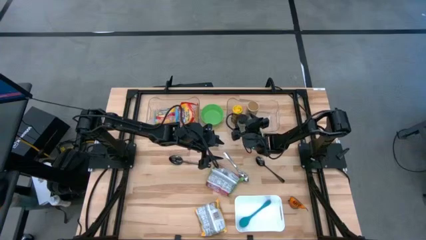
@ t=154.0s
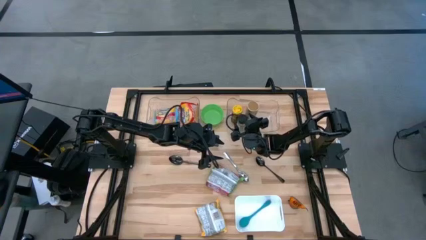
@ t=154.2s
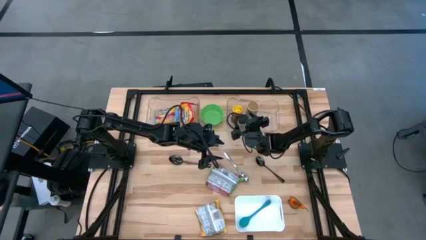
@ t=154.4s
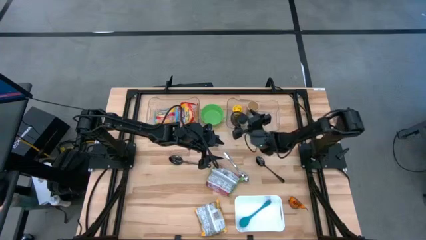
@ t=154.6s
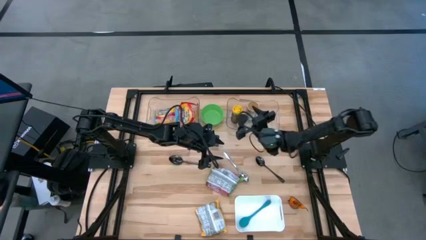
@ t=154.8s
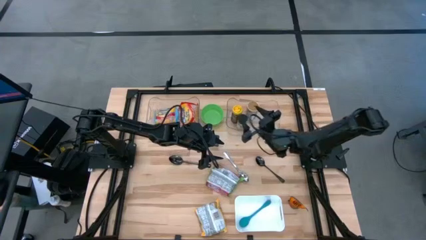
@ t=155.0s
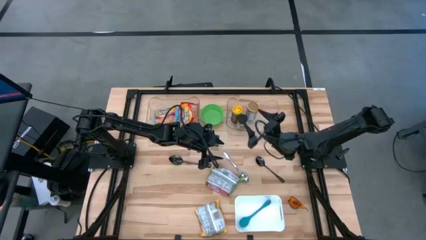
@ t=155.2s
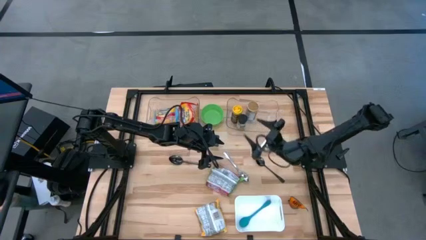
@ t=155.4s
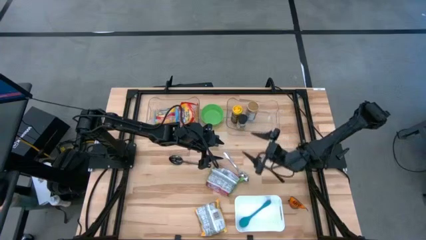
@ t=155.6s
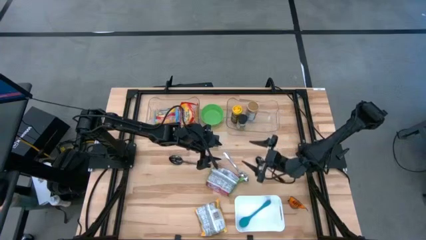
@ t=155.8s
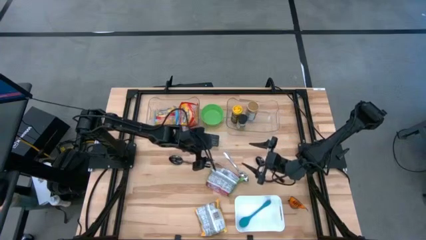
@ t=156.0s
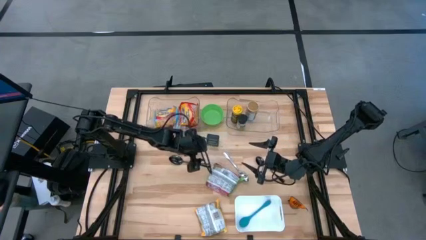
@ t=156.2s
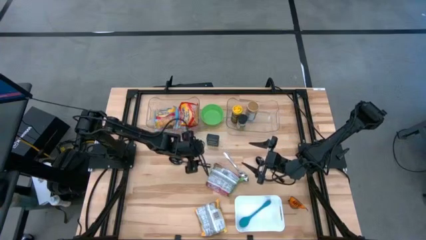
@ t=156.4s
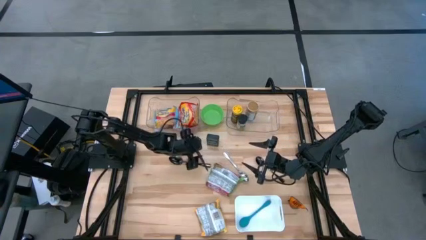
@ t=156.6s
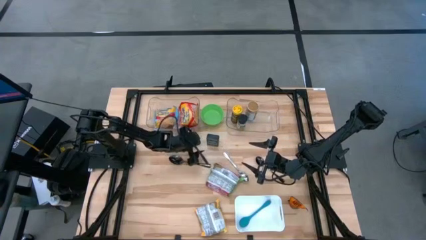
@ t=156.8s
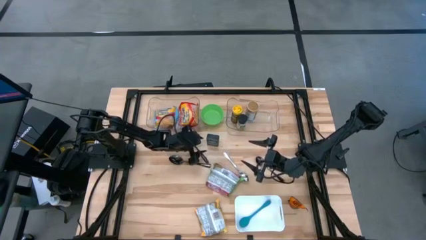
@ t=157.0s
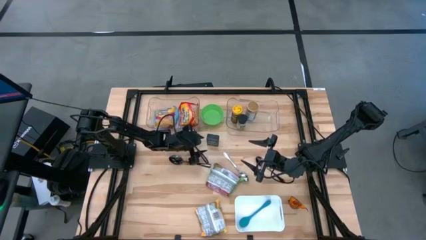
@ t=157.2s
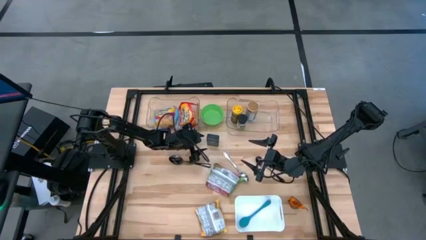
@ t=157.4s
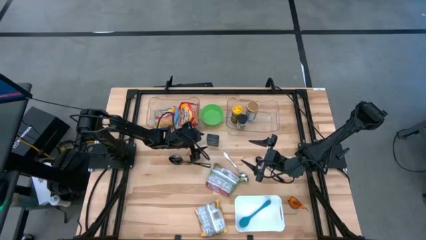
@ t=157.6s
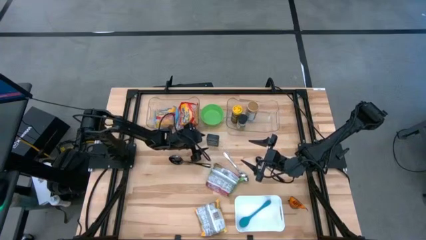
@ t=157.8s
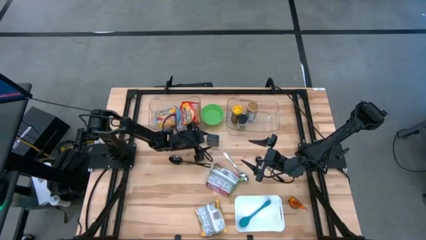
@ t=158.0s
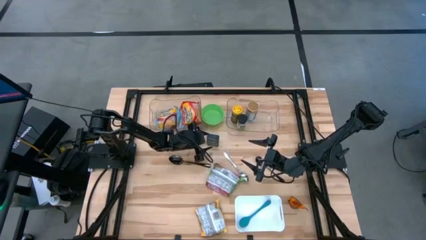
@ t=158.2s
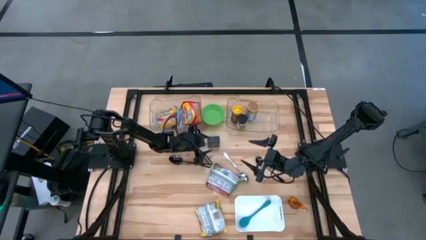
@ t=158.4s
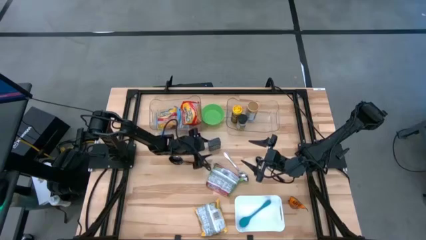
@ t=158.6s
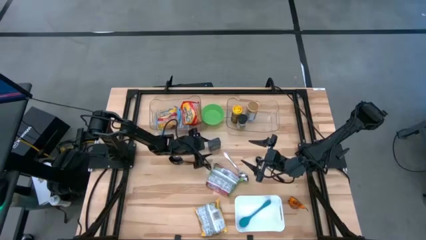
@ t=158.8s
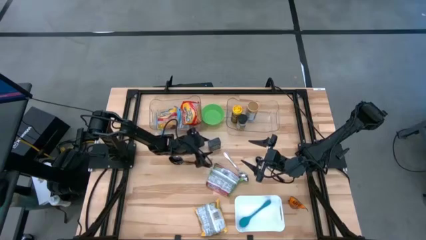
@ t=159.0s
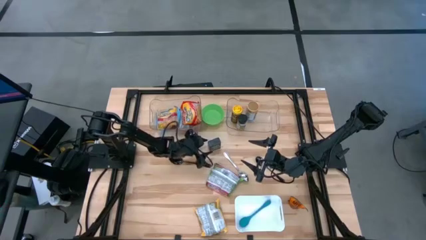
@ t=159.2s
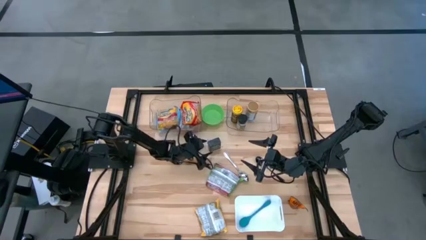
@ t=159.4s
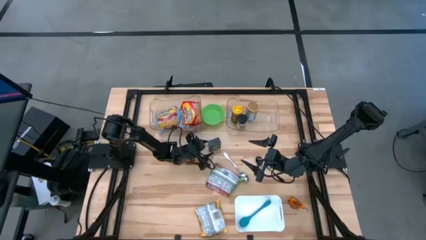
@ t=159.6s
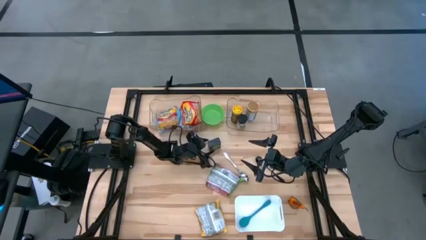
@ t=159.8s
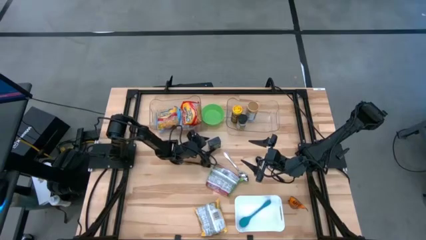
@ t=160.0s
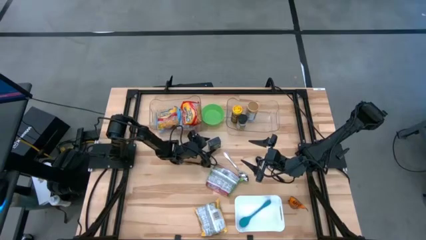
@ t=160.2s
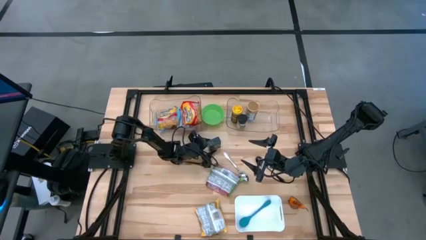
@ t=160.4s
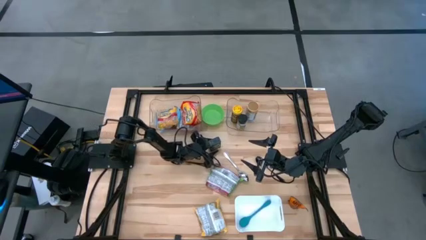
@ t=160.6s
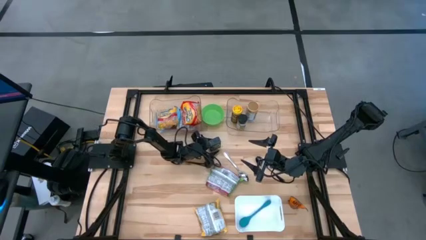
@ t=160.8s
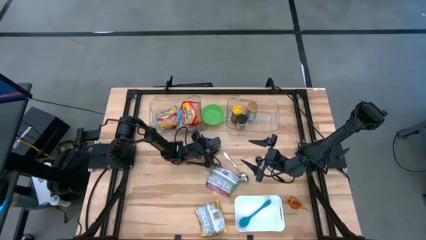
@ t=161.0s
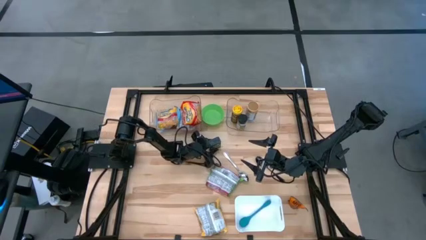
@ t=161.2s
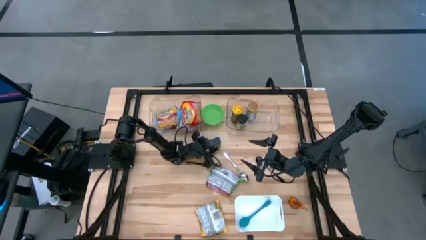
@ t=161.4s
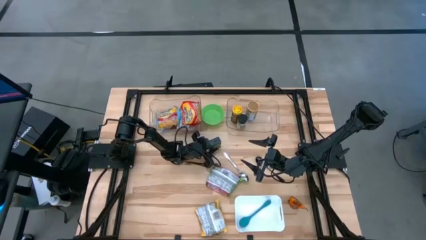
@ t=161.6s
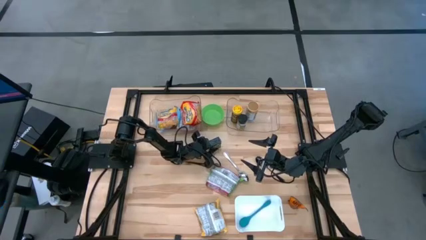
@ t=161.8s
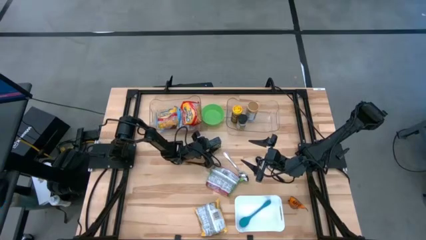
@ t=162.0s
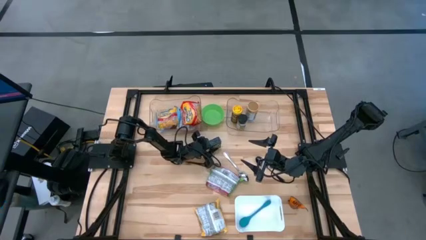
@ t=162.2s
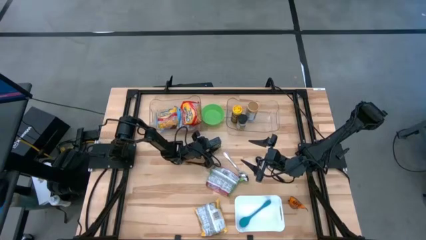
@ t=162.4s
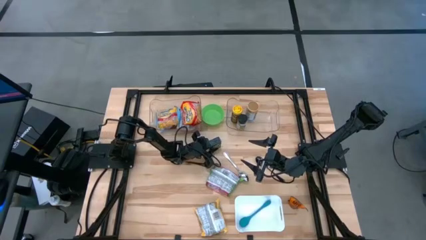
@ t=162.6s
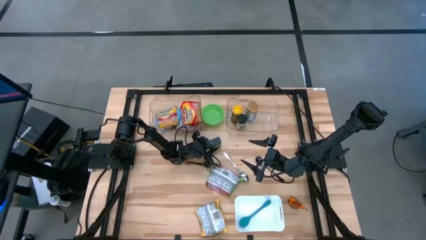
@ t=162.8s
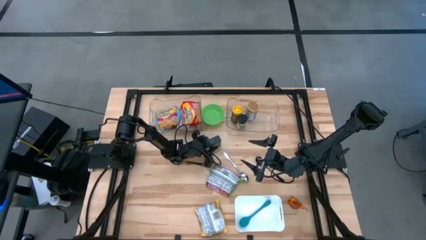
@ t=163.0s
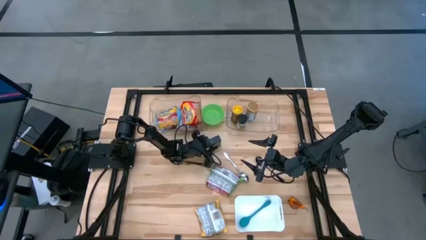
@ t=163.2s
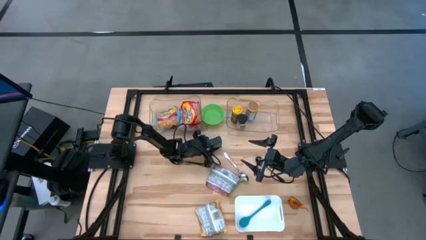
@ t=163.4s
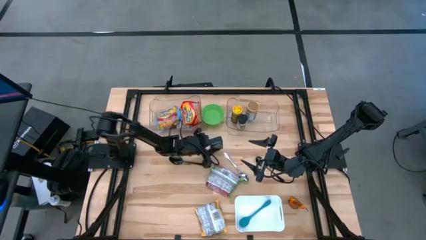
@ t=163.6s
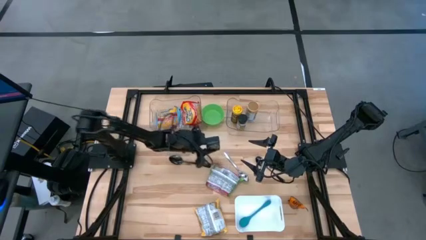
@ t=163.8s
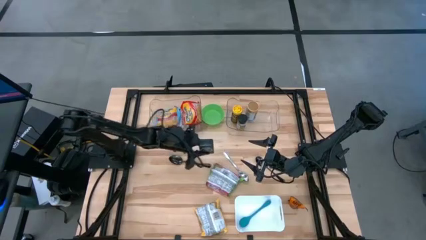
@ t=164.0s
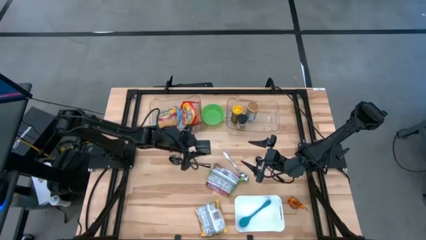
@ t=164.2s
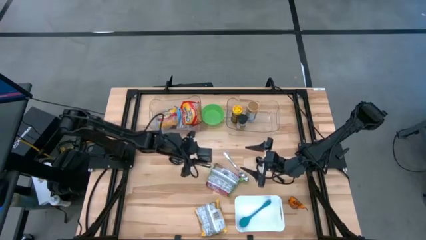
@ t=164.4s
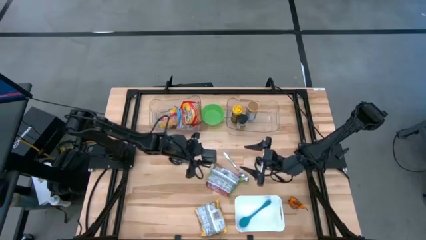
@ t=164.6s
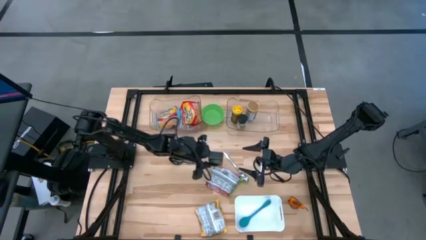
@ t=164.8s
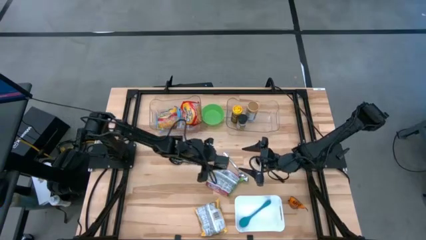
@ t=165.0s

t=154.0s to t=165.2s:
Task: Pick & Place Food Item
Put the black spice can in the right transparent bin

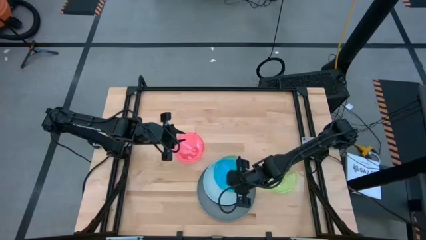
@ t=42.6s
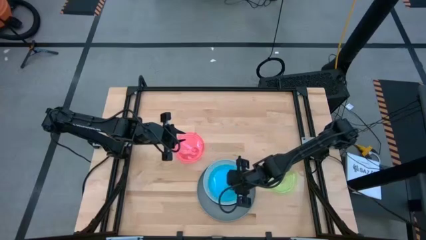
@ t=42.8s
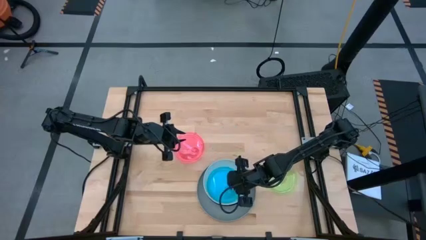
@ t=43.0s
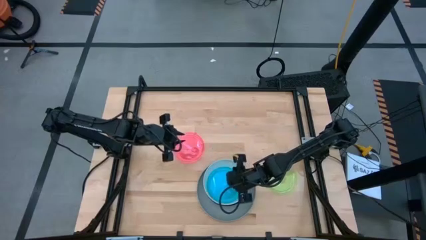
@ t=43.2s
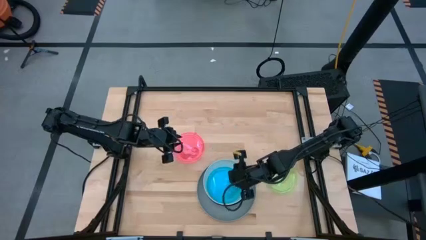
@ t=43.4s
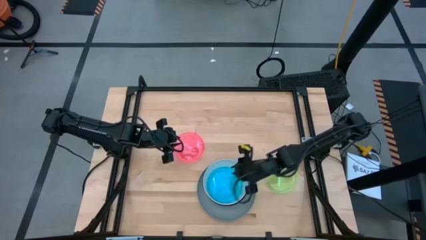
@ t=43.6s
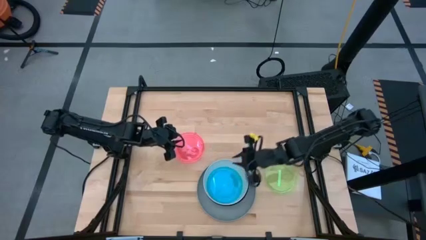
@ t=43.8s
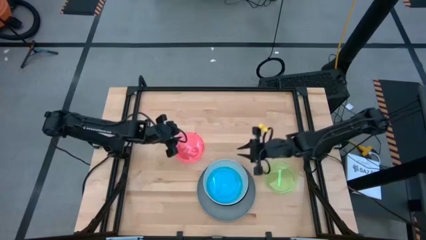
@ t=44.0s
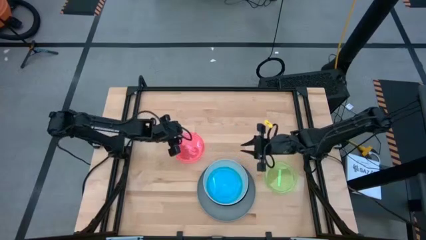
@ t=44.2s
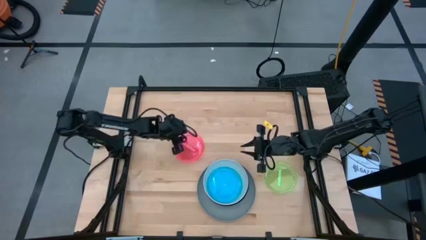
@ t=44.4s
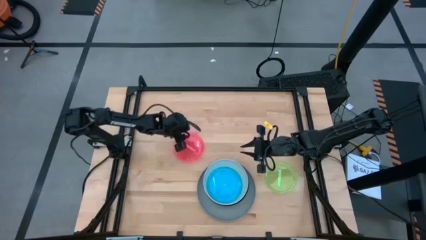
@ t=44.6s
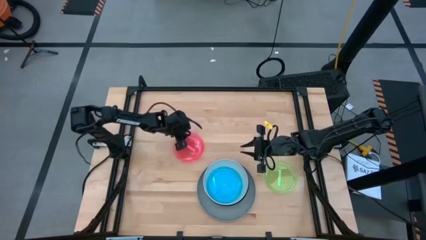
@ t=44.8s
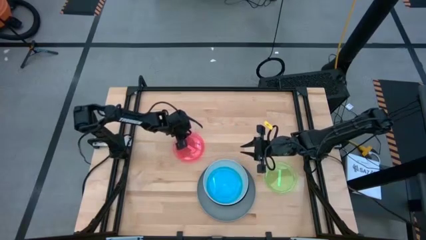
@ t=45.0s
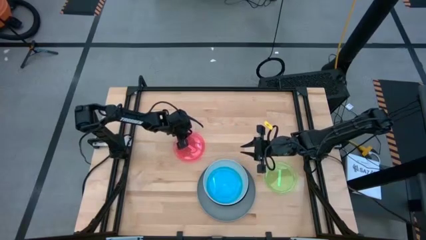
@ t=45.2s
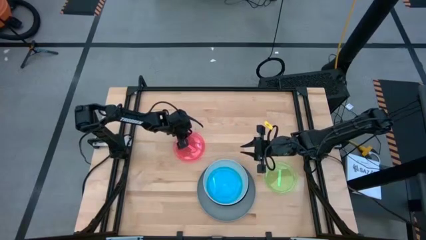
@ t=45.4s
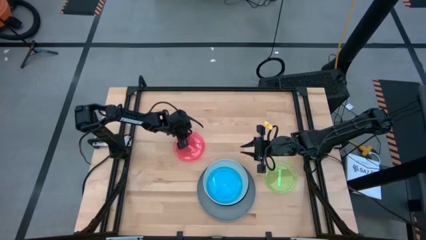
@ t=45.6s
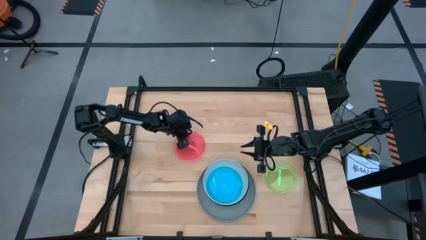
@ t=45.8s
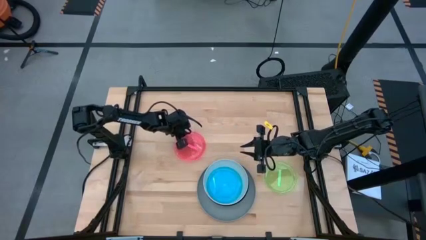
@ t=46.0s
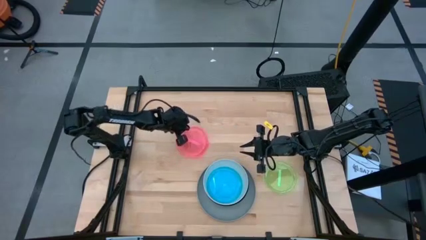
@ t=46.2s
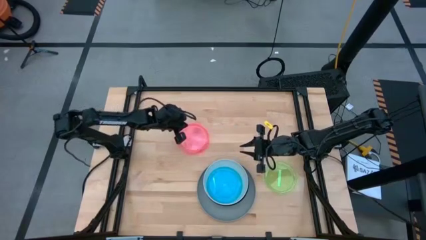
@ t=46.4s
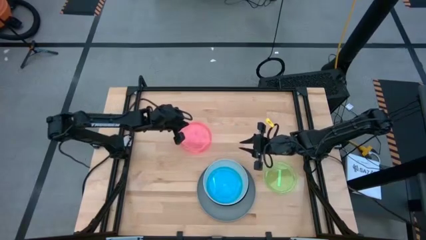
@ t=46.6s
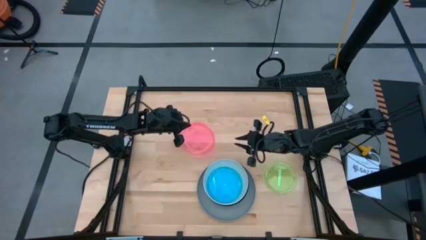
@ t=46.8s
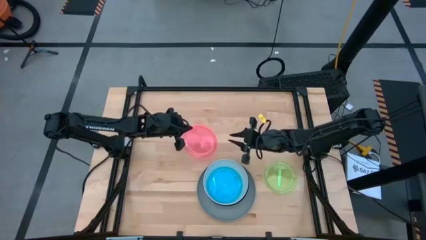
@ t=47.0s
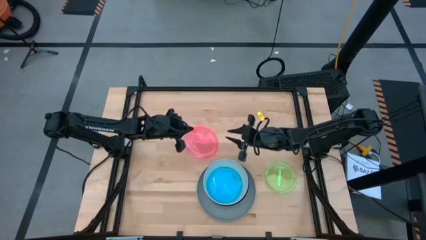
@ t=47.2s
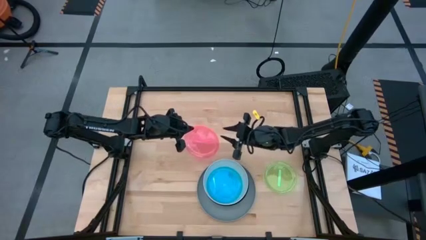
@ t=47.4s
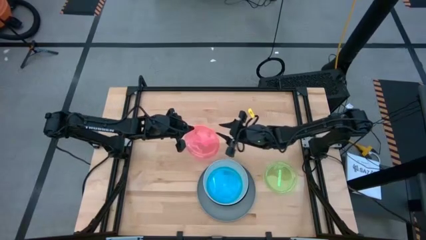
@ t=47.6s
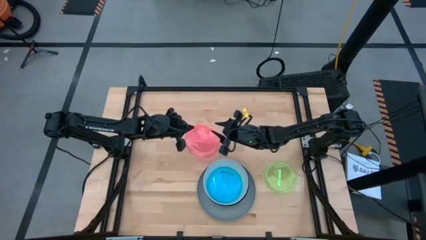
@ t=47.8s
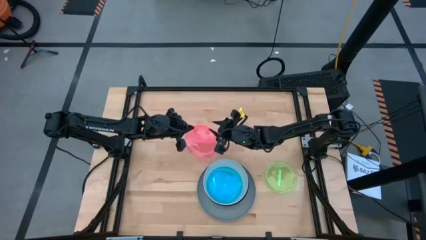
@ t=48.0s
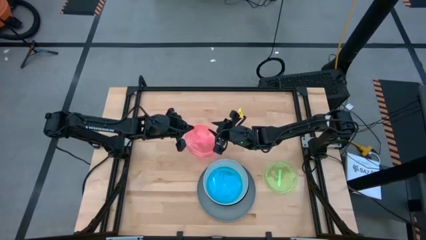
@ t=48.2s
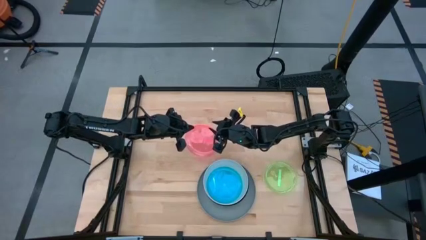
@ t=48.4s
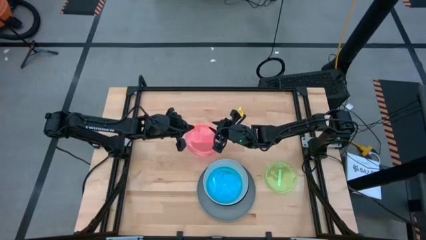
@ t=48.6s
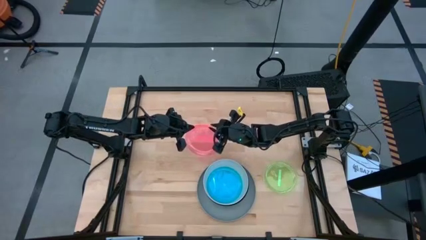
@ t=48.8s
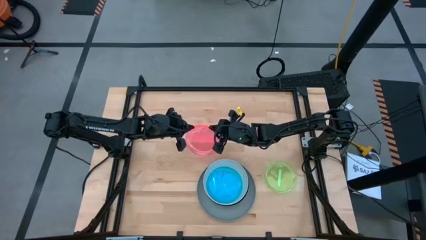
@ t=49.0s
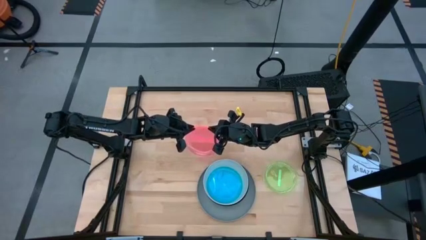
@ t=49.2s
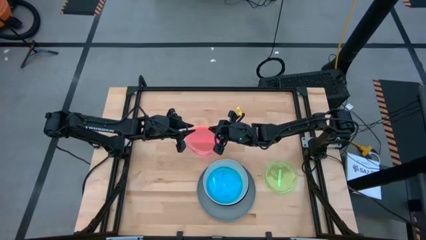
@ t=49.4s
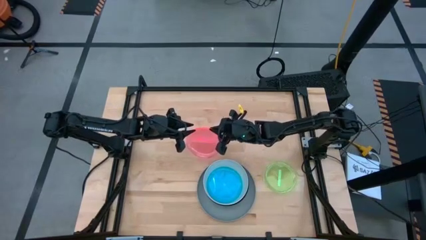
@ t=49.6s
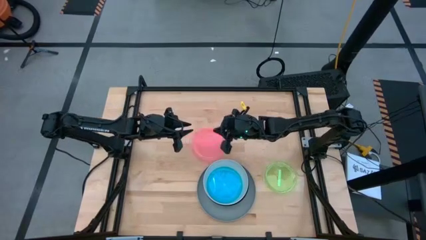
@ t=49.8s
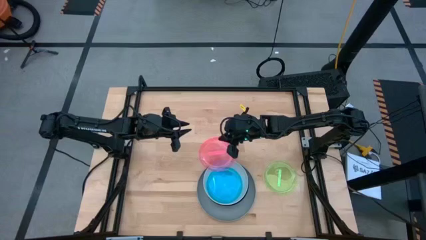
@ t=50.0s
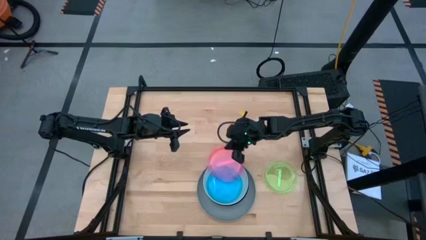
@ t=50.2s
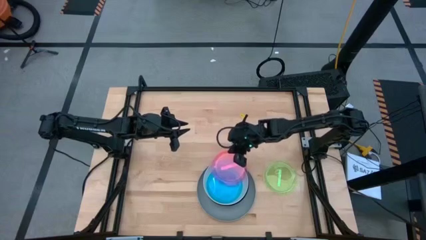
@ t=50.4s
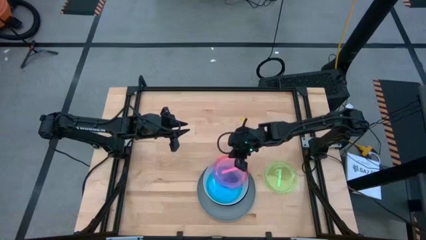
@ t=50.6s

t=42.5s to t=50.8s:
Task: Stack plastic plates
Stack the pink plate on top of the blue plate
